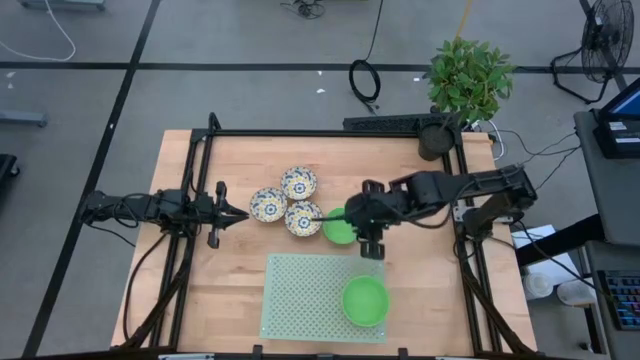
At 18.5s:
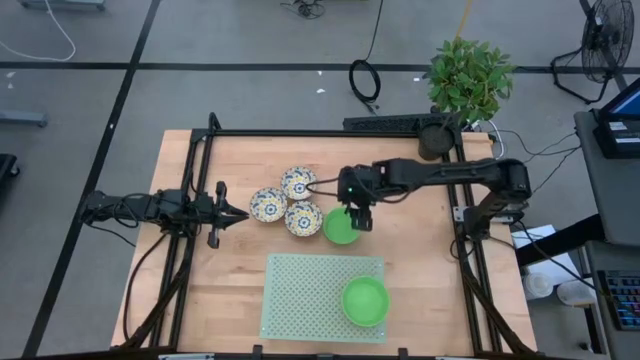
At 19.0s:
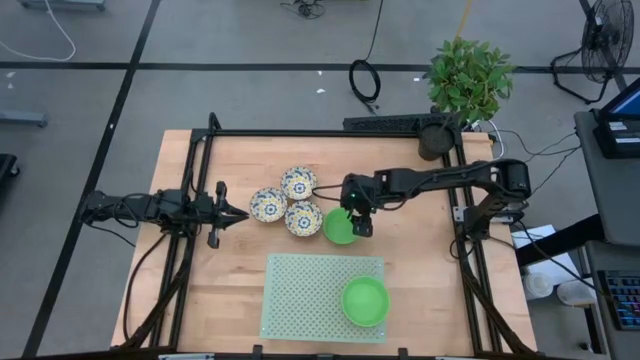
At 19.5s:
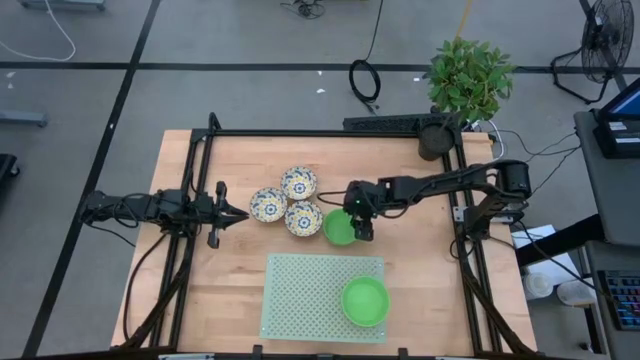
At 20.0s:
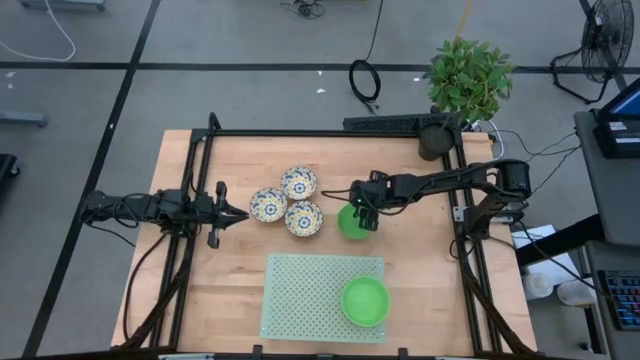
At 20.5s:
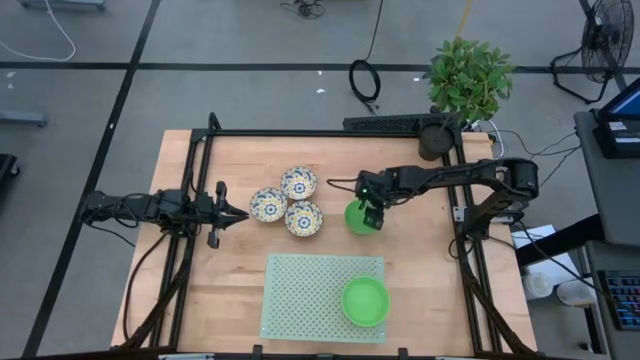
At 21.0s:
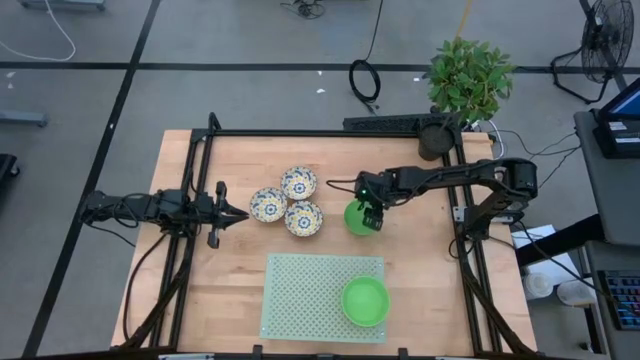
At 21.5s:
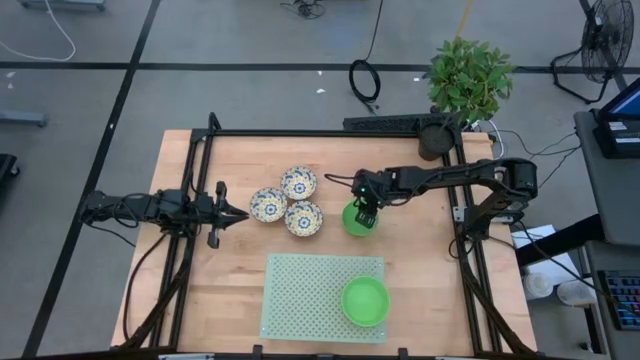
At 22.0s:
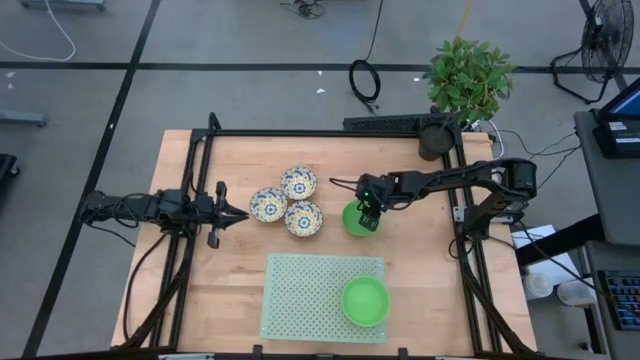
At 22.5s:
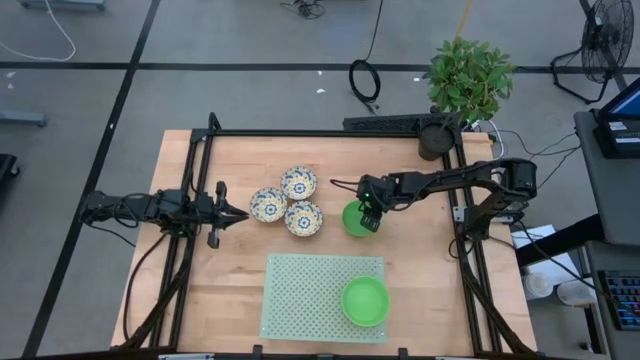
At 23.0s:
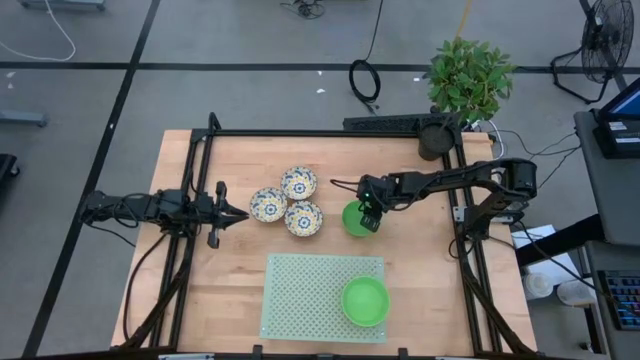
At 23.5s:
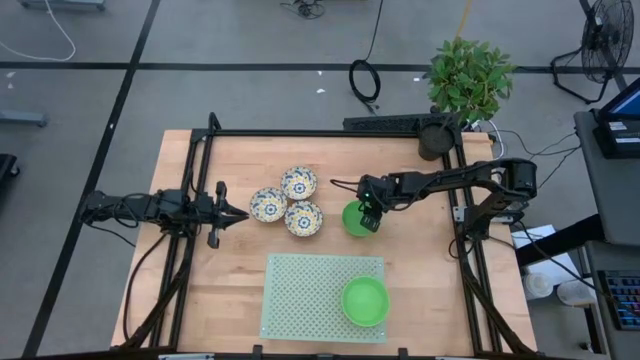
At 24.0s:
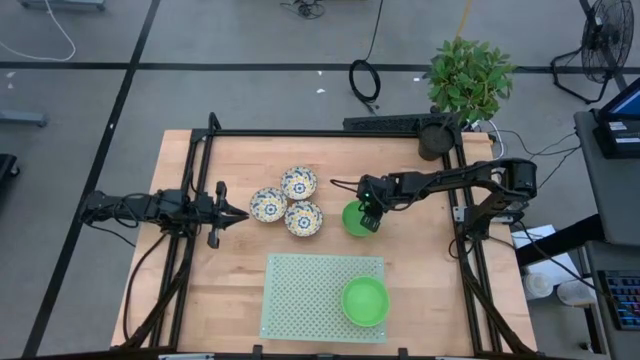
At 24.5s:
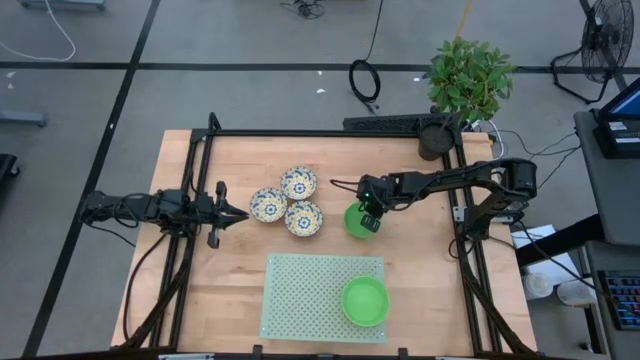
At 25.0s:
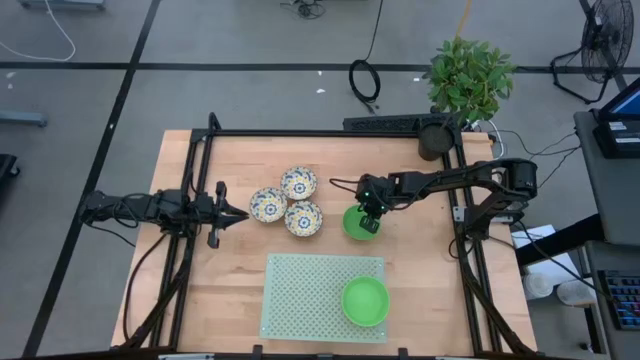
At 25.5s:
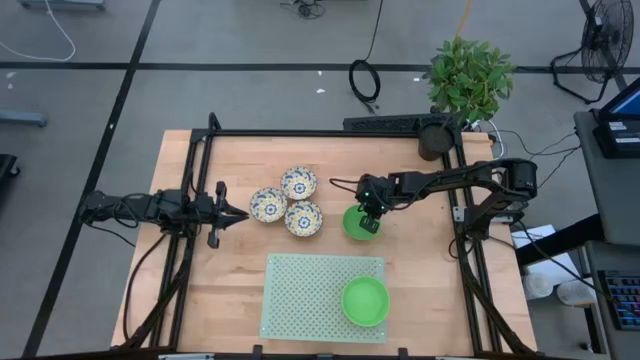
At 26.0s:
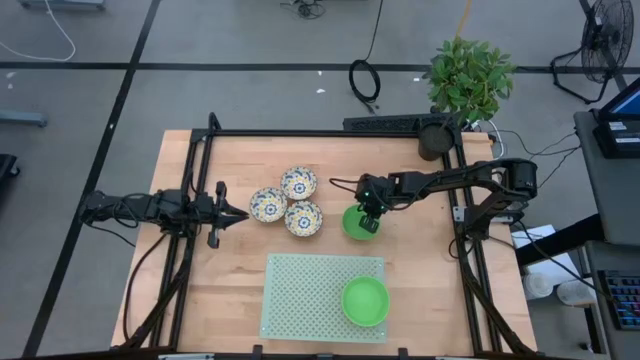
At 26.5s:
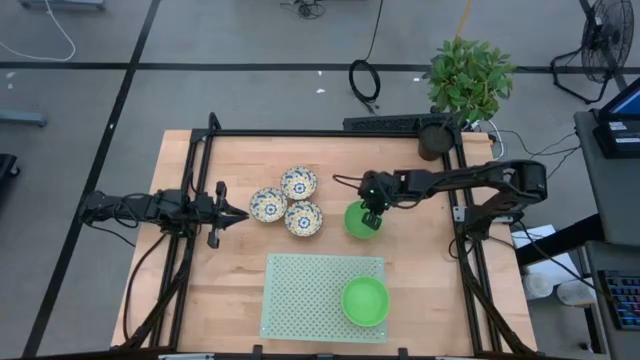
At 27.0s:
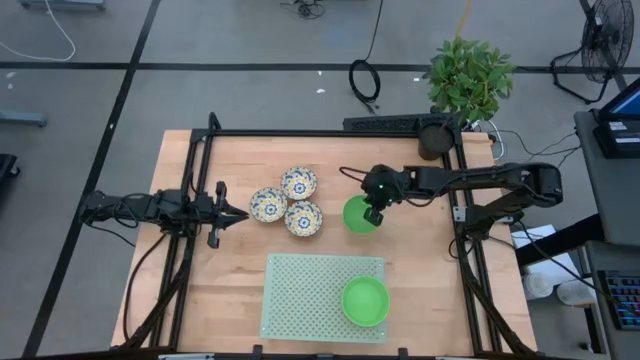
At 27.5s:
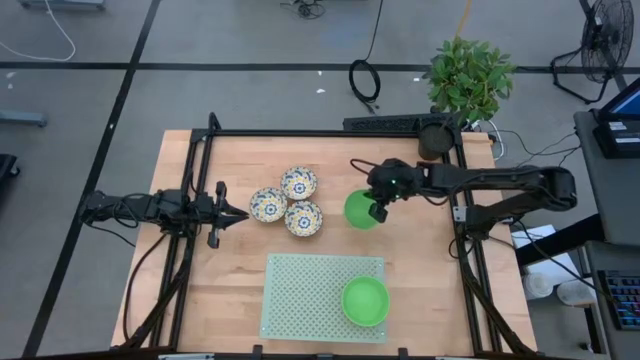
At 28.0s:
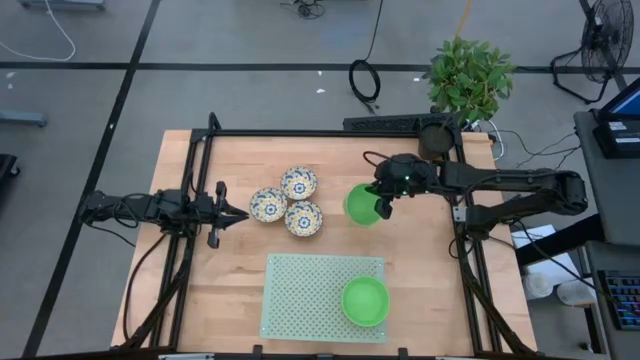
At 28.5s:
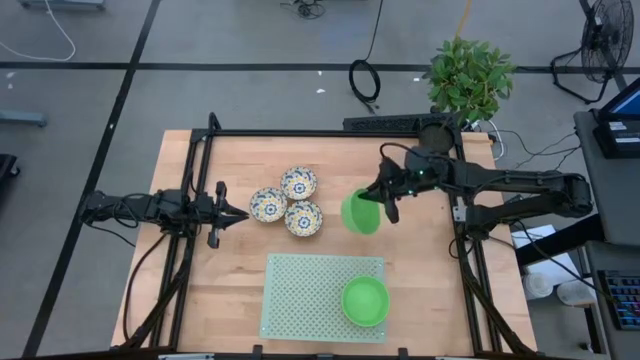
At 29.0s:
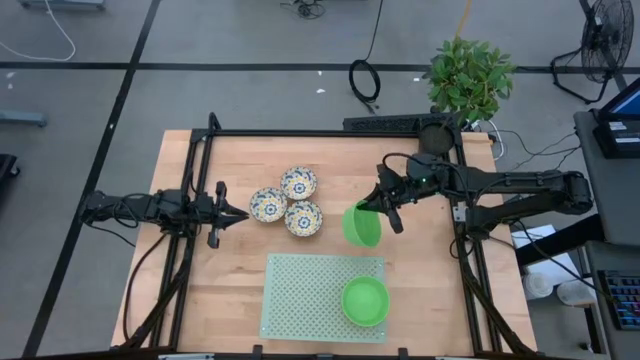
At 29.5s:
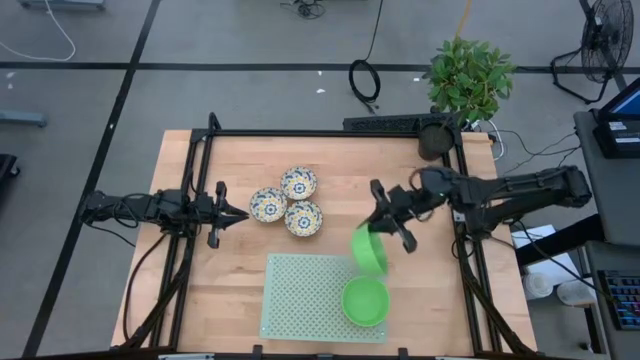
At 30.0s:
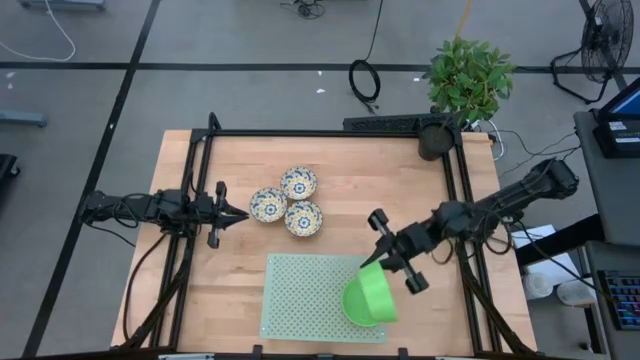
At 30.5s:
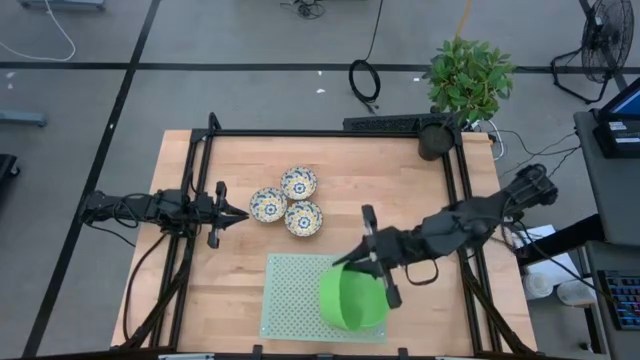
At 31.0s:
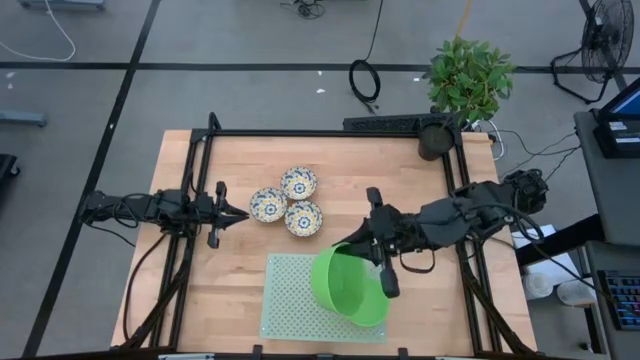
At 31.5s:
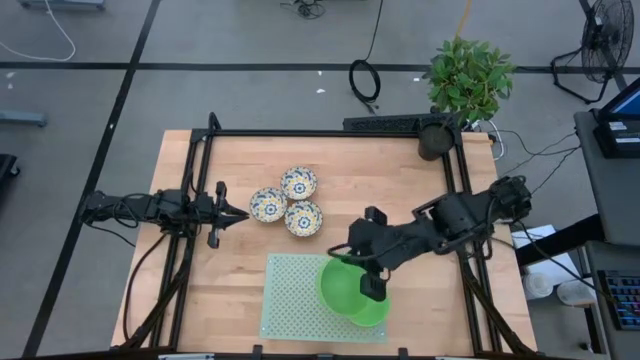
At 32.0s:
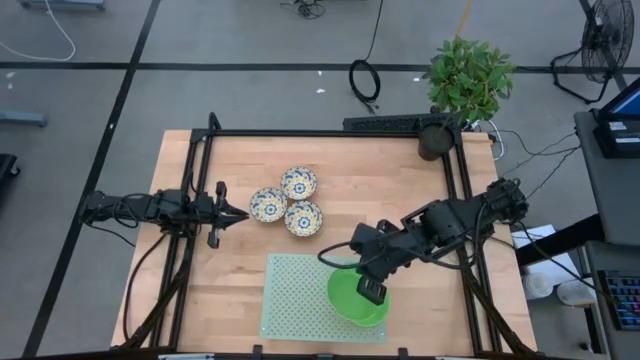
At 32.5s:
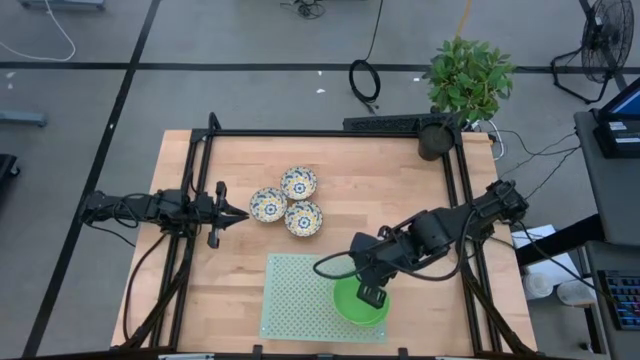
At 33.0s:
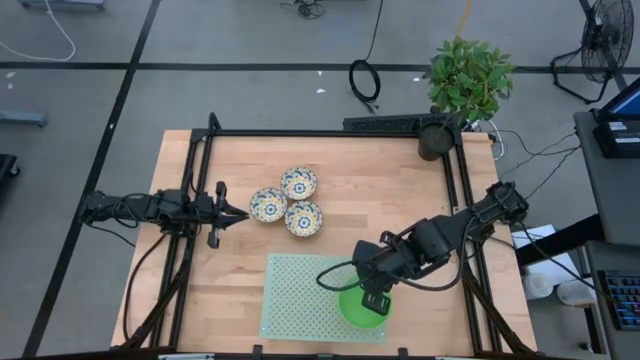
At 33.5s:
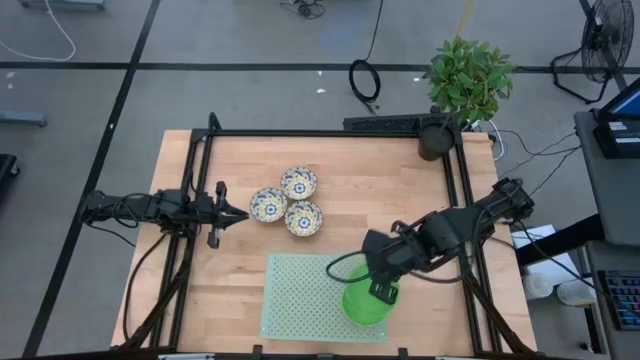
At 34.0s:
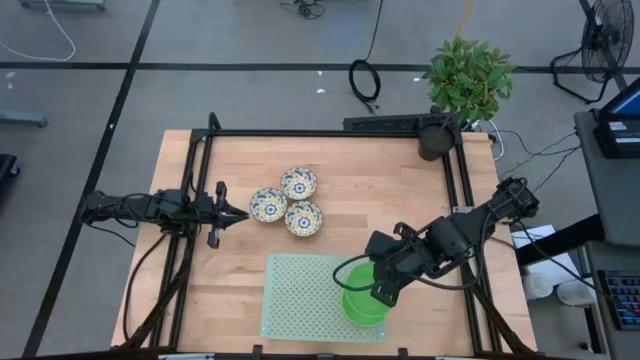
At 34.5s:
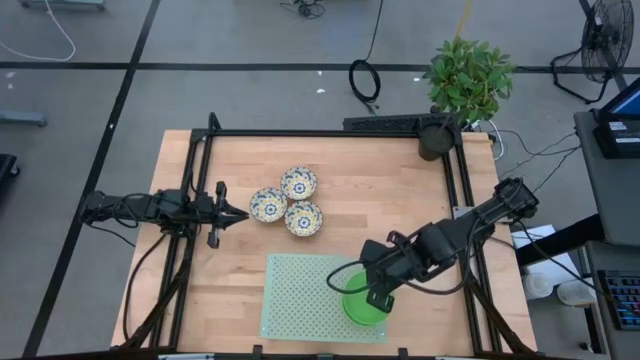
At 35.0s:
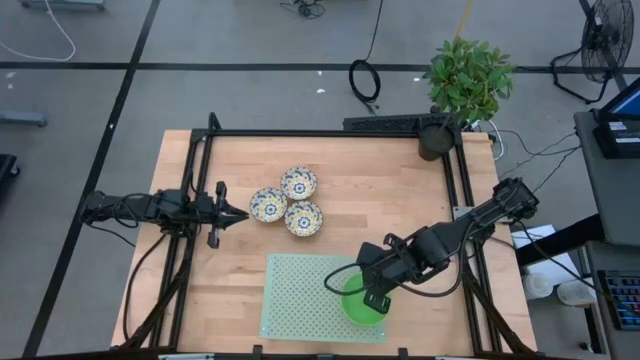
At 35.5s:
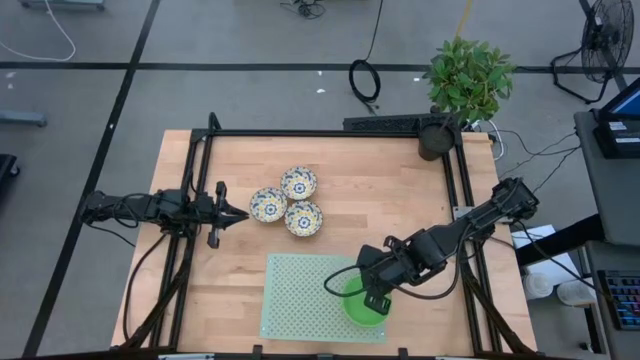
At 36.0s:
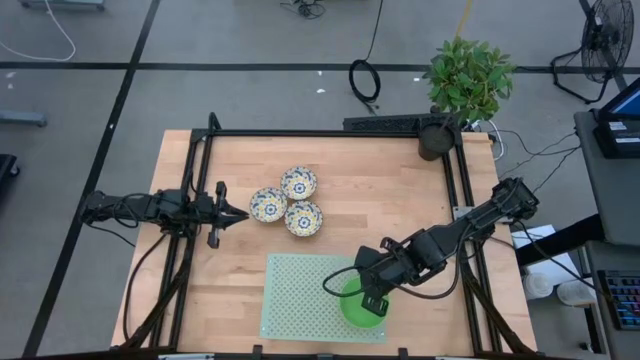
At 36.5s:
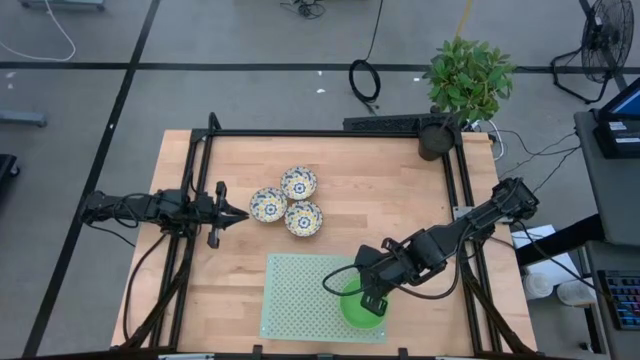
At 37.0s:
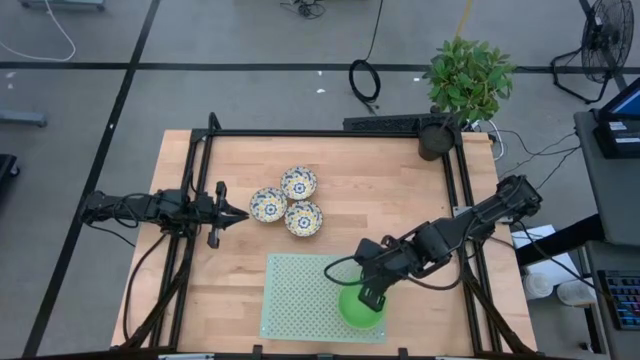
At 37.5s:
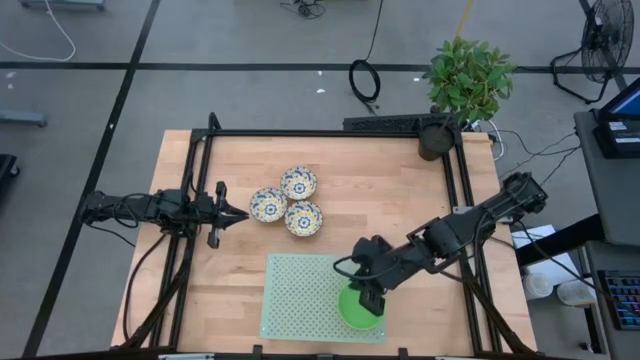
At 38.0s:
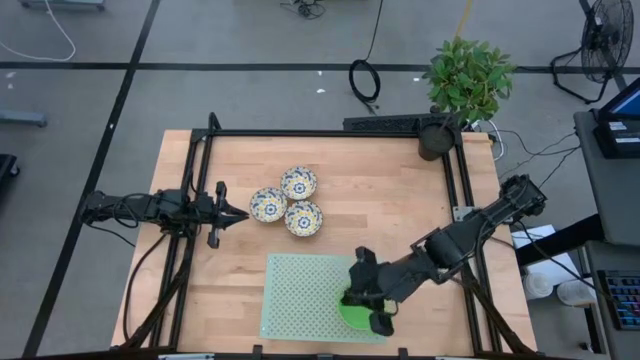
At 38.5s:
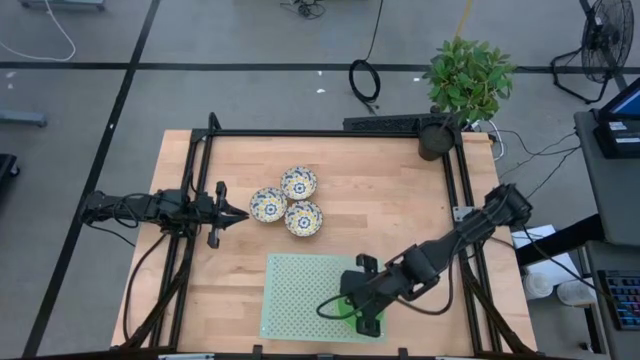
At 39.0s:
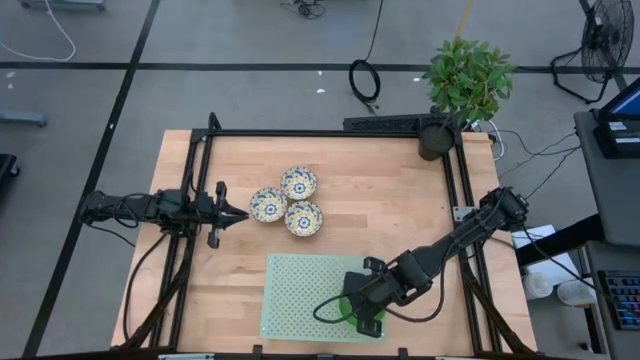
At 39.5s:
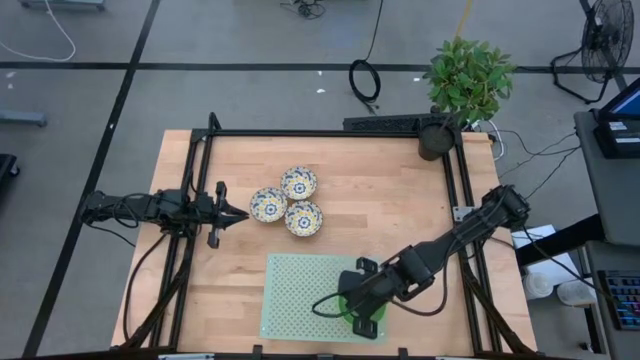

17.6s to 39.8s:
Task: Pick & Place Mini bowls
Stack the green bowl on the green bowl on the shelf
